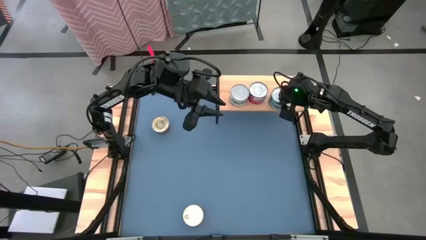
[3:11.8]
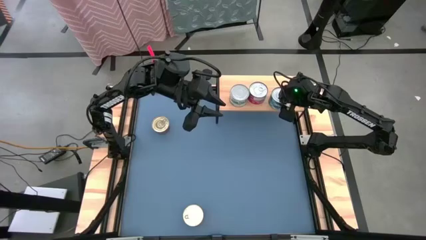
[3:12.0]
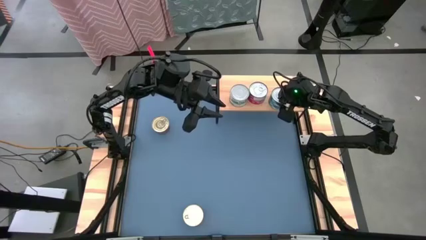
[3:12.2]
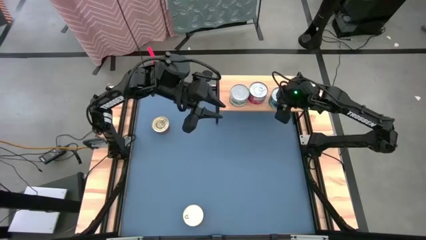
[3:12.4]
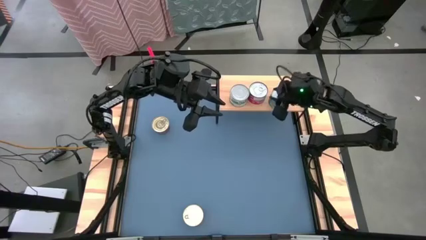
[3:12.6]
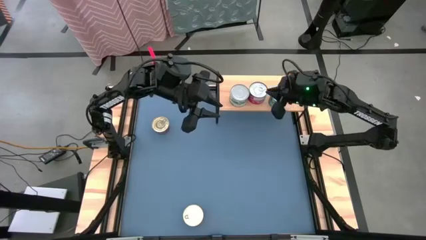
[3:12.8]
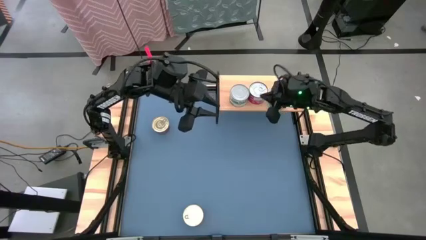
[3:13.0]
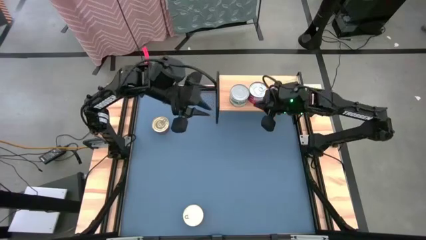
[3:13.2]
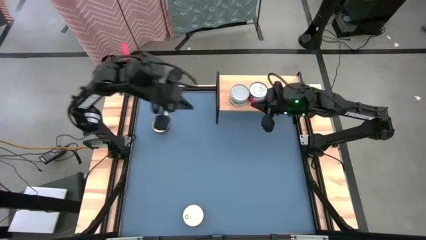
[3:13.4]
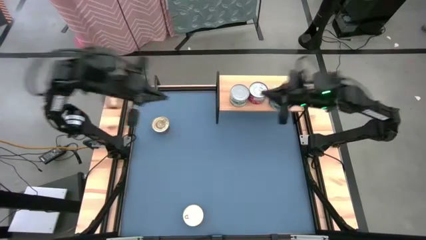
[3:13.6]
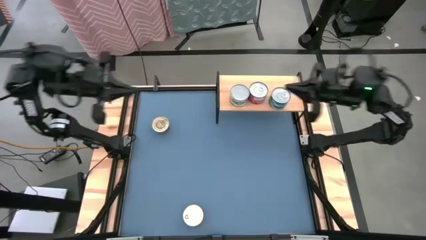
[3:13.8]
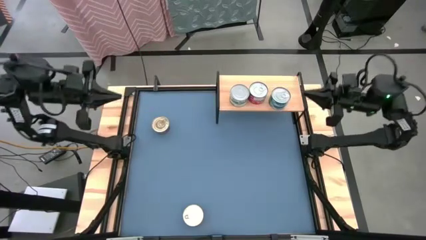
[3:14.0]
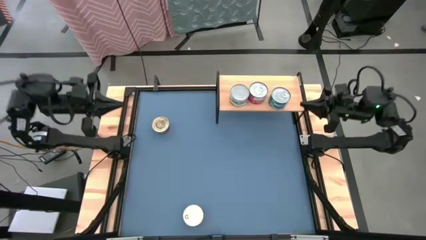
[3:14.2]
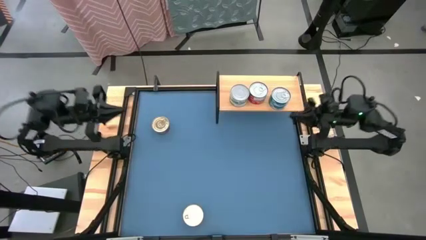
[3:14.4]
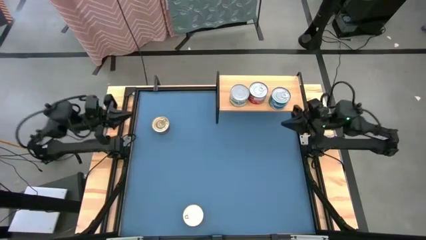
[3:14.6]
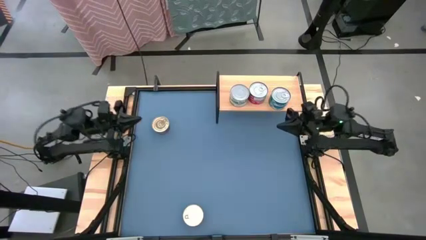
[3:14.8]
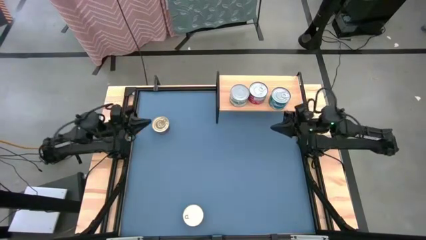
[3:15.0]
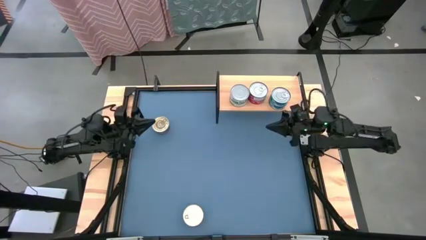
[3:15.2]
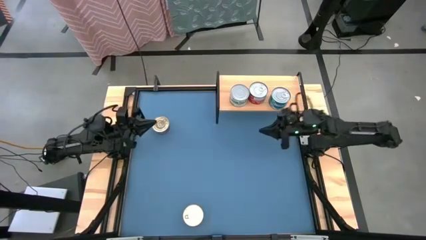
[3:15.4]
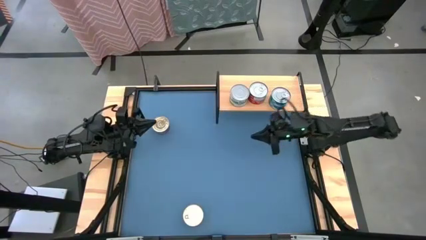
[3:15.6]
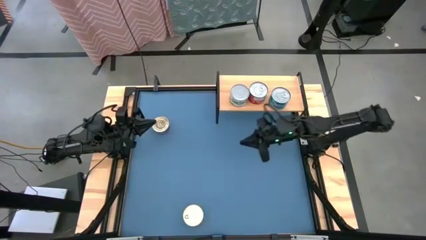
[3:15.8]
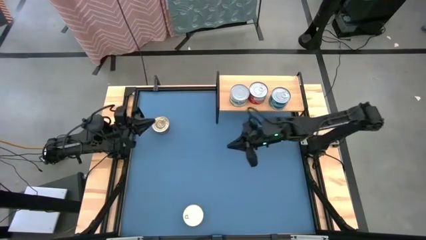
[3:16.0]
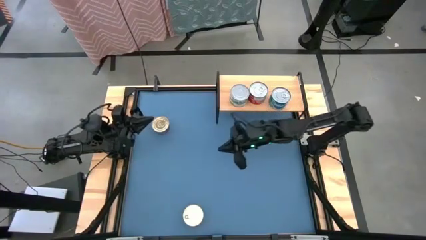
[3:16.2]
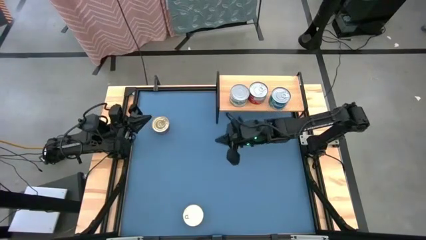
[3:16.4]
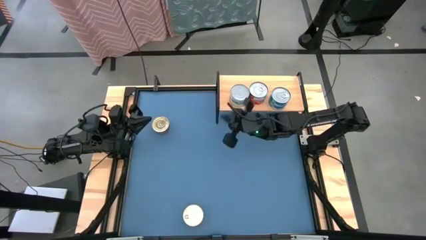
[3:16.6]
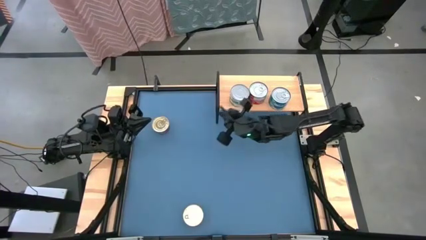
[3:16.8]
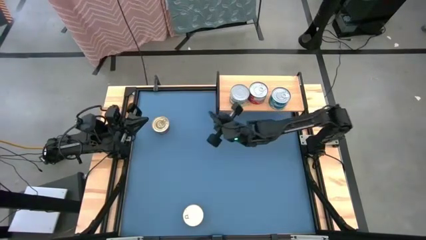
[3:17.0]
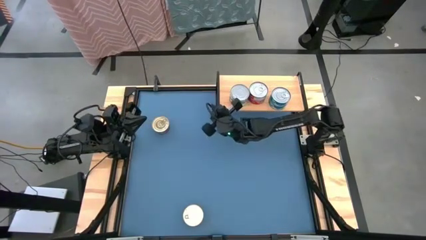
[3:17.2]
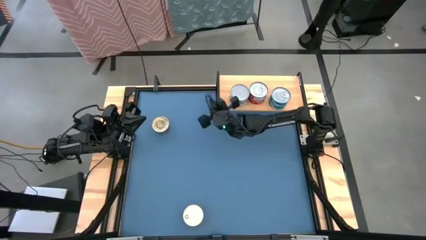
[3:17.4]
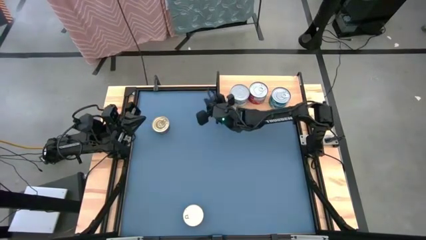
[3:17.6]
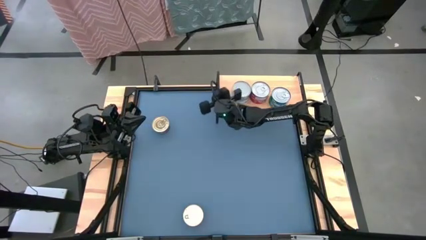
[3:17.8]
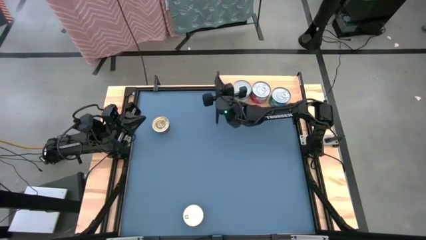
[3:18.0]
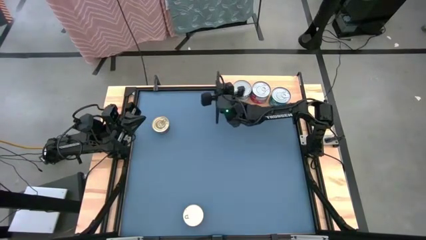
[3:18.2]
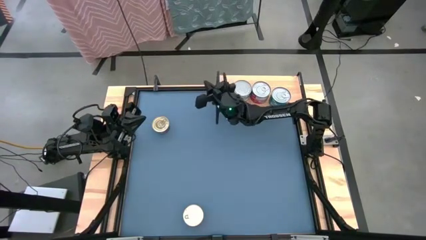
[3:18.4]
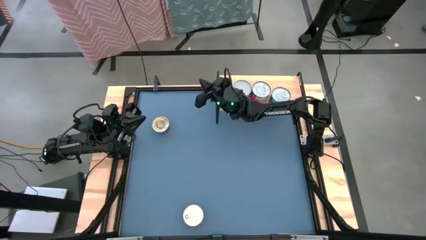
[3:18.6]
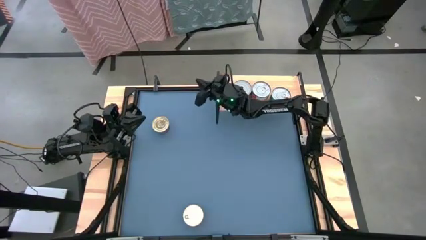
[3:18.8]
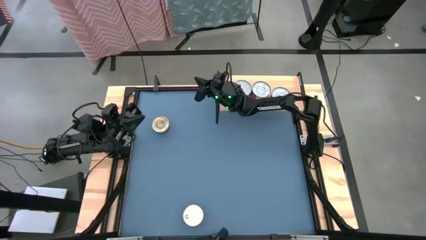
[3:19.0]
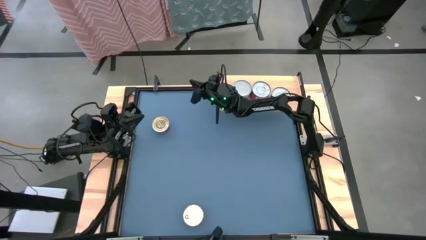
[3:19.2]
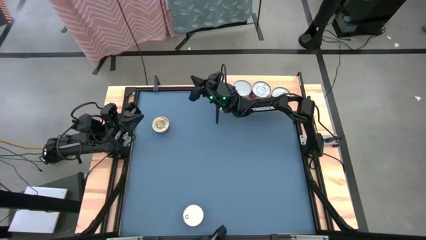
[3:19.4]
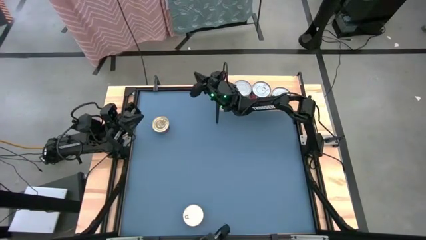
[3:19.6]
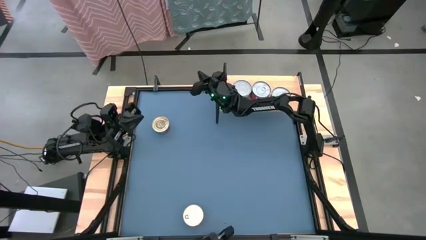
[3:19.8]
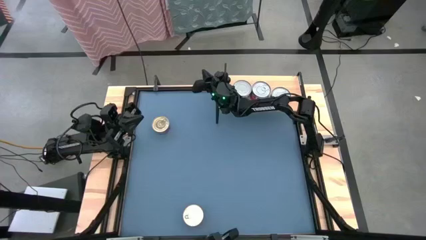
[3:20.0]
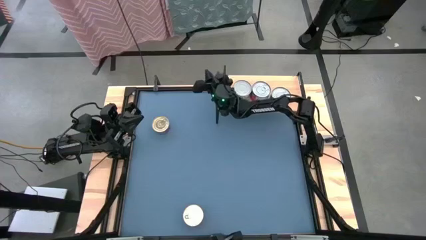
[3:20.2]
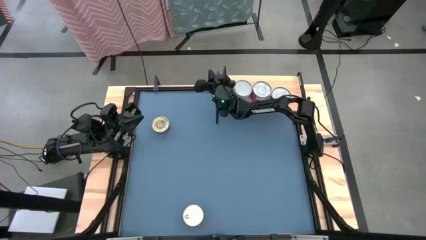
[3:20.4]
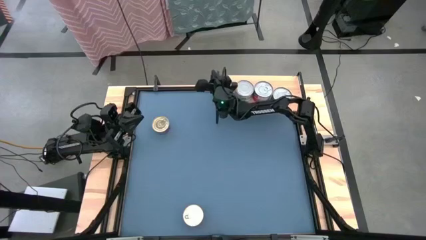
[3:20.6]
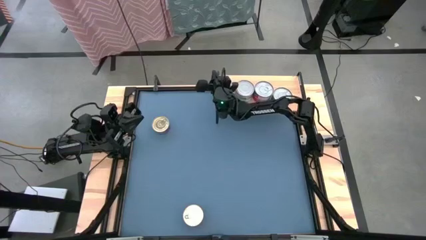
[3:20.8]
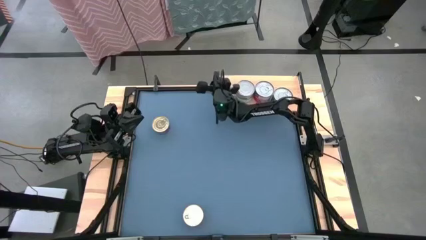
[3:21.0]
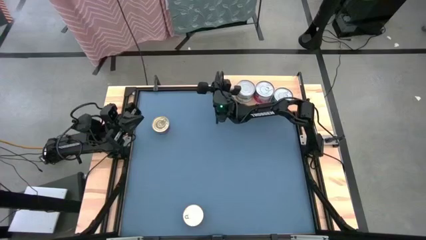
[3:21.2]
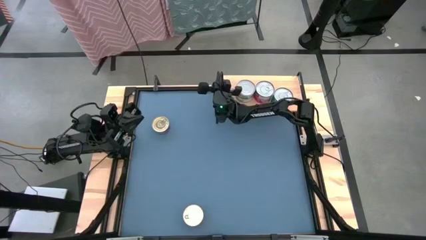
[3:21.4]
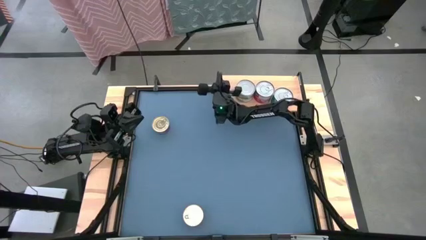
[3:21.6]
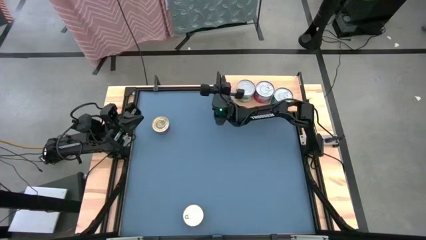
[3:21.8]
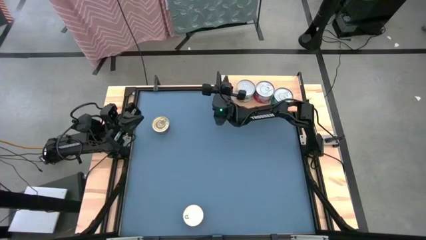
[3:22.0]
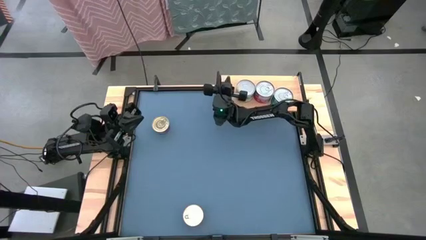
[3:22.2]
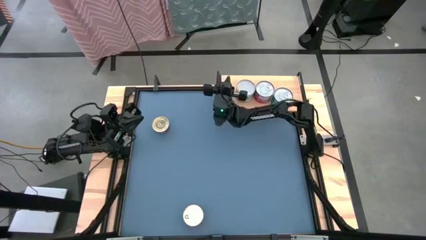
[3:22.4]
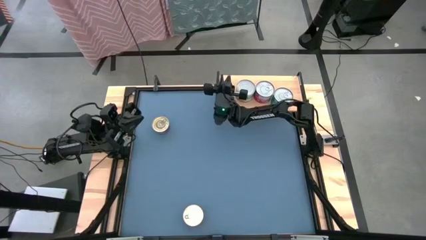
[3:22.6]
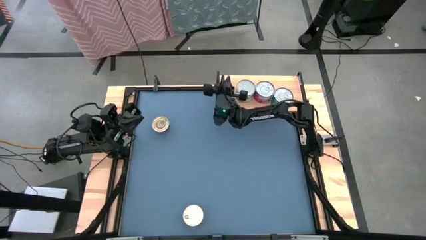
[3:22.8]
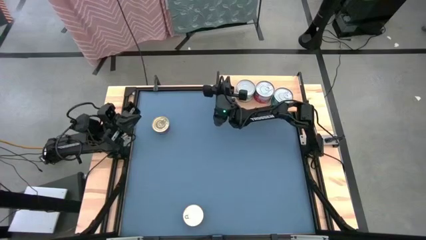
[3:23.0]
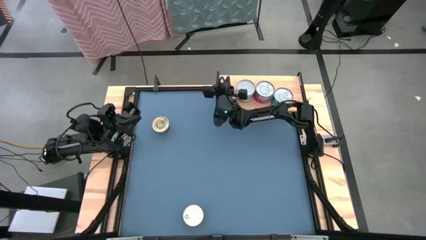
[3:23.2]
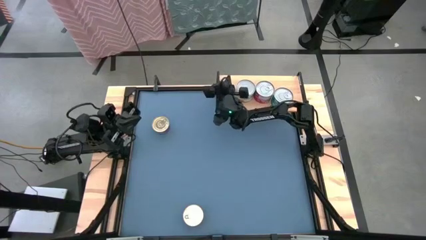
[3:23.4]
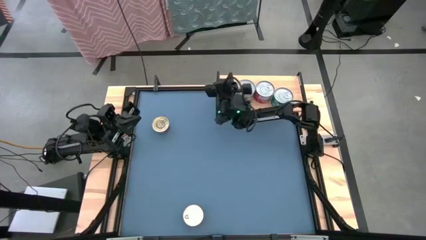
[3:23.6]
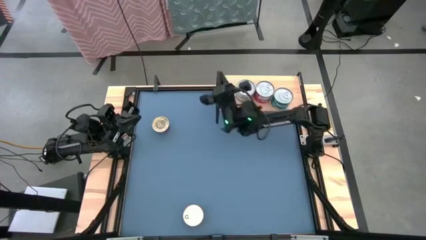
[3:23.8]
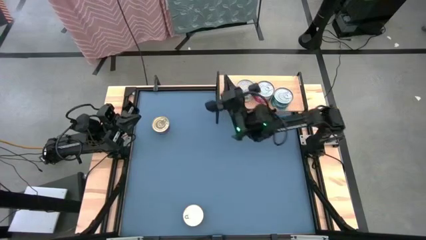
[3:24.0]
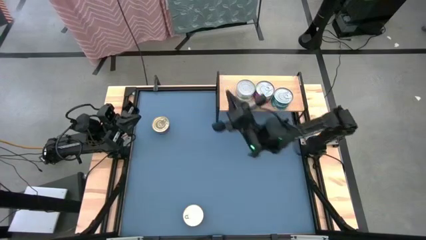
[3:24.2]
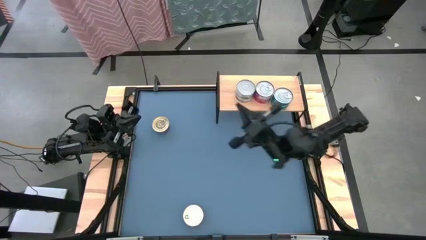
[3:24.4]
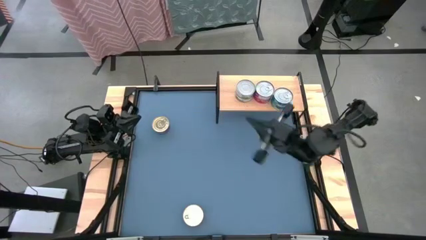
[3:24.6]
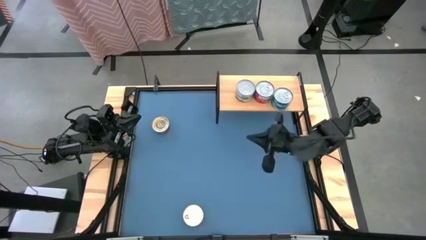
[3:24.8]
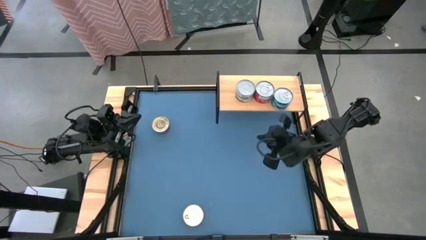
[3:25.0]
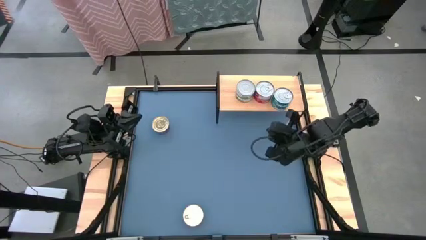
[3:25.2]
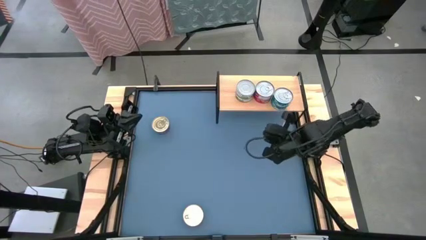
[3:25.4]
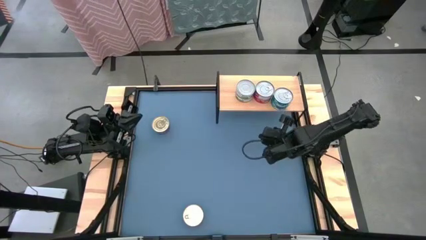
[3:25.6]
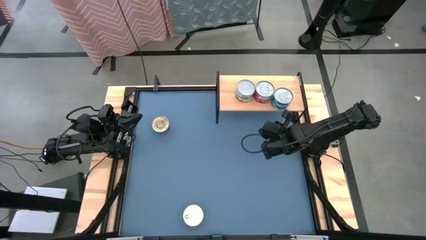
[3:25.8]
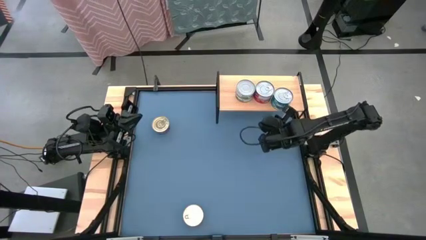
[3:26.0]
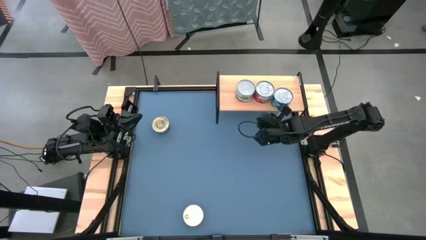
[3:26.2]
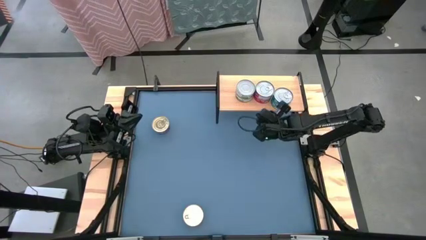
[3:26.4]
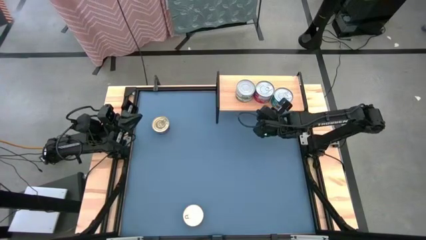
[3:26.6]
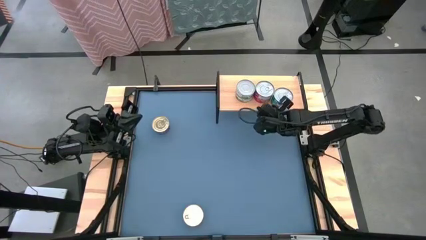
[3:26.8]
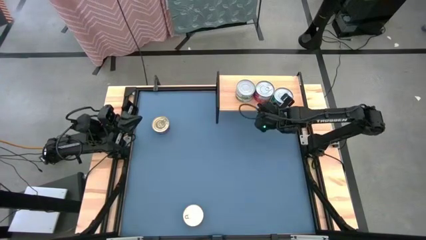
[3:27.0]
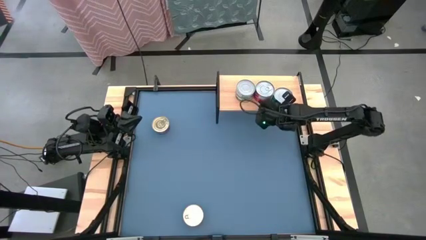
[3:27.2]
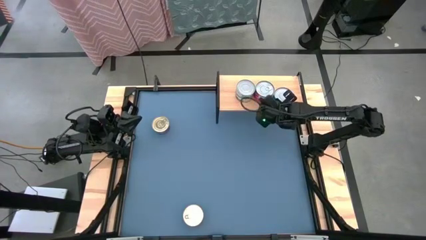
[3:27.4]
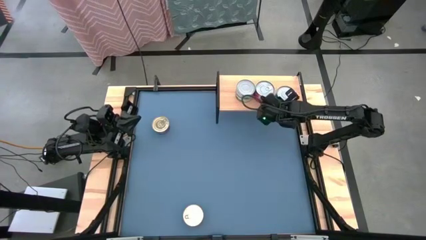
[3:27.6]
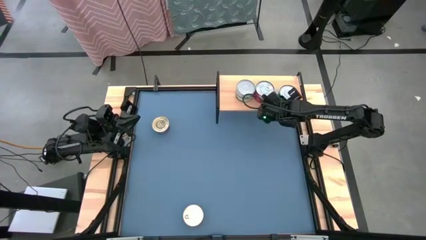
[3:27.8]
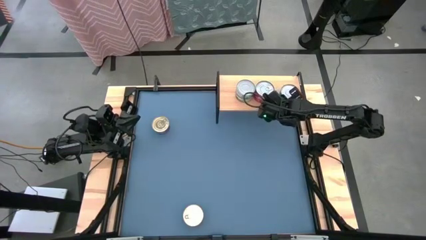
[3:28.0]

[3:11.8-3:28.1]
Task: Stack canned seafood by type on shelf
Adjust the stacked tuna cans on the shelf

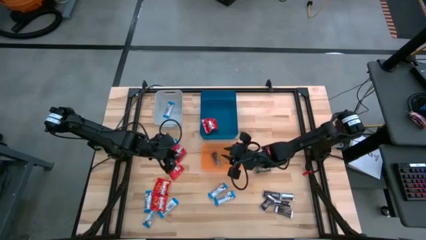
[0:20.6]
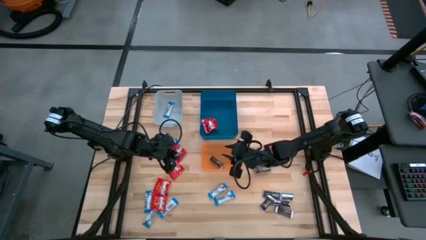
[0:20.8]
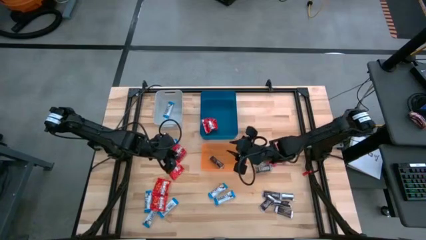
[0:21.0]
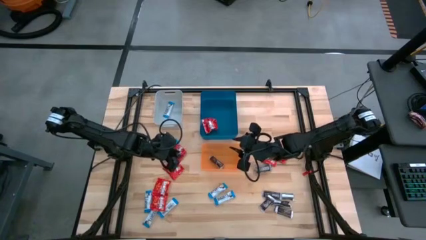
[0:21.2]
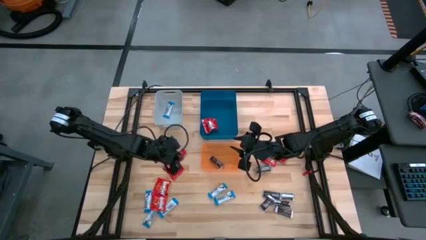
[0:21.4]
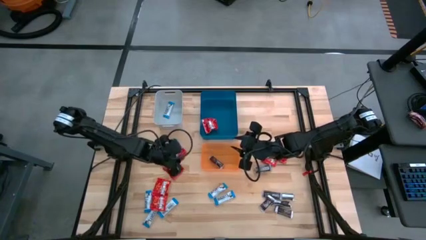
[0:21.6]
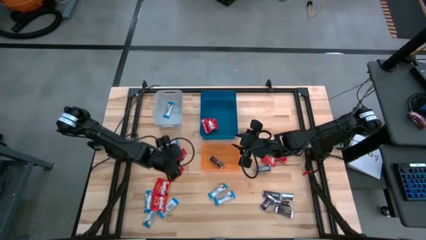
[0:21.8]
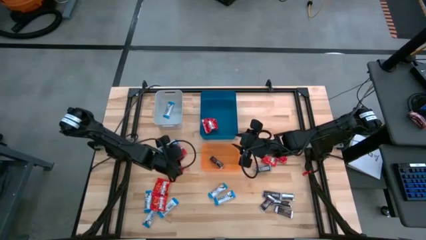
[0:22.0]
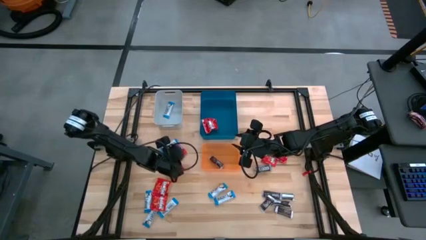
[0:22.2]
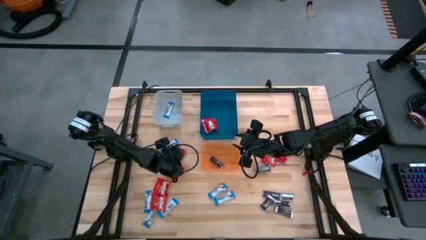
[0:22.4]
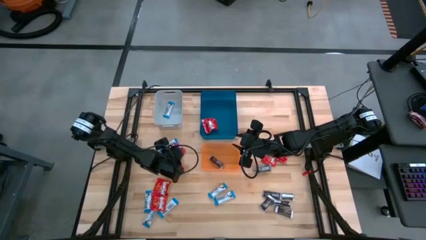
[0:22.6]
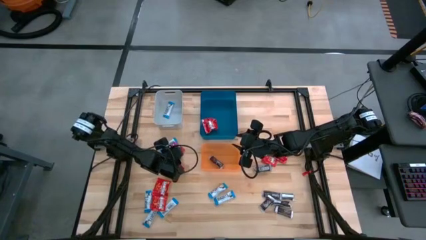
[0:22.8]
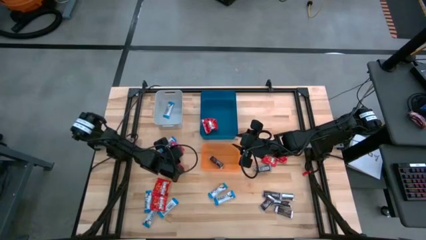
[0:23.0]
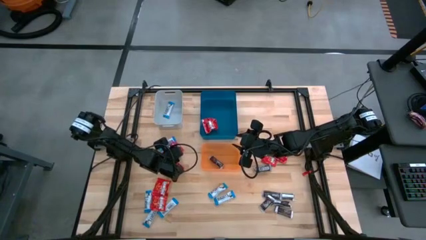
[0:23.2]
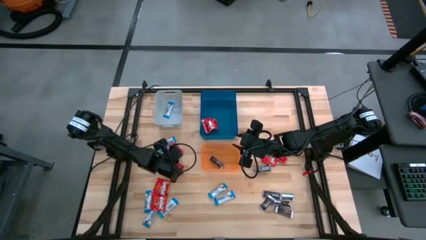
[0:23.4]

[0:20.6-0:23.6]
Task: Sort candy
Put the red candy into the blue bin
